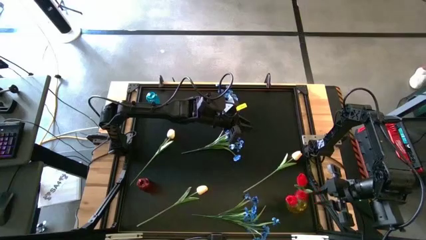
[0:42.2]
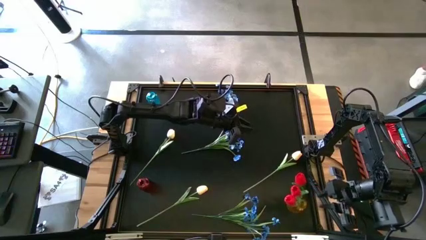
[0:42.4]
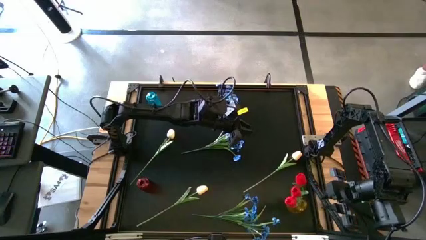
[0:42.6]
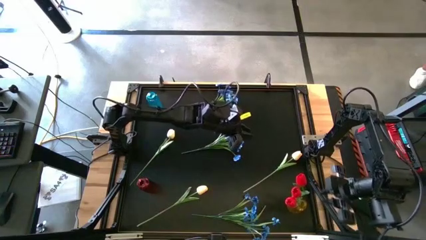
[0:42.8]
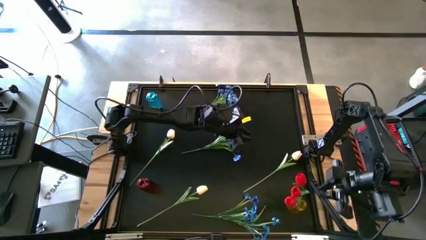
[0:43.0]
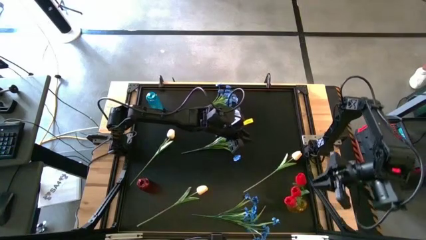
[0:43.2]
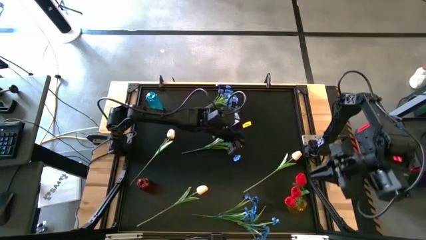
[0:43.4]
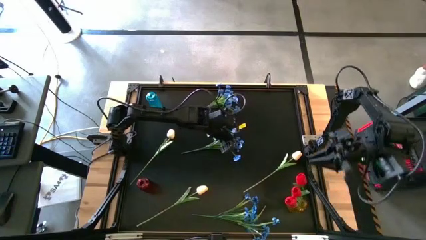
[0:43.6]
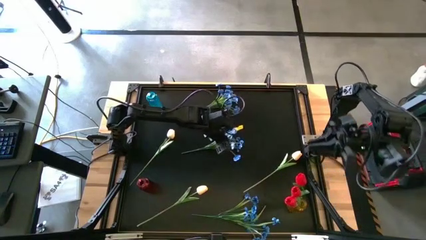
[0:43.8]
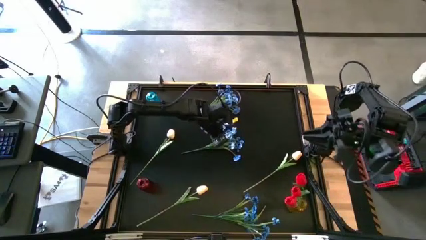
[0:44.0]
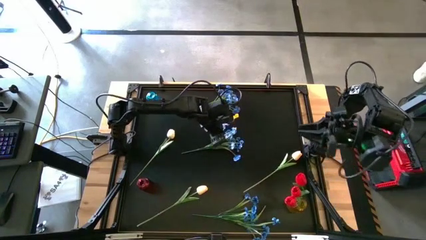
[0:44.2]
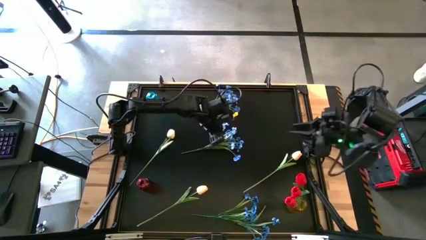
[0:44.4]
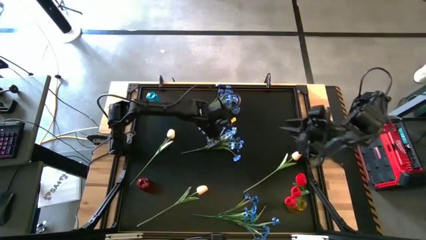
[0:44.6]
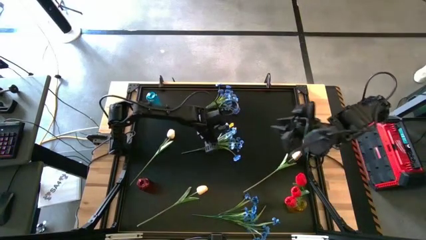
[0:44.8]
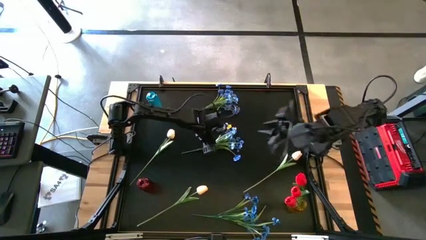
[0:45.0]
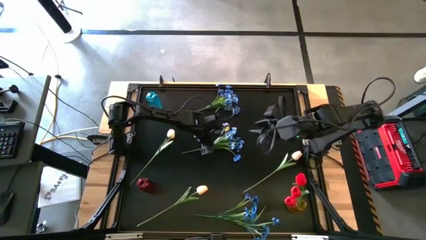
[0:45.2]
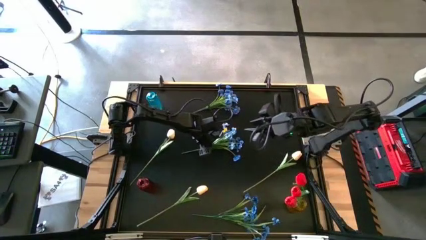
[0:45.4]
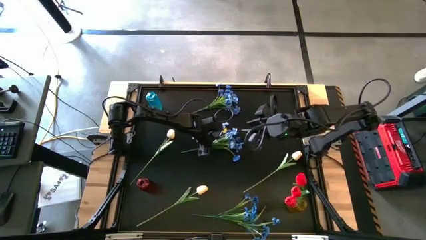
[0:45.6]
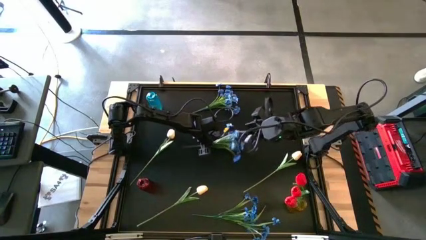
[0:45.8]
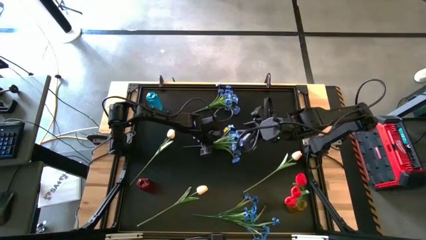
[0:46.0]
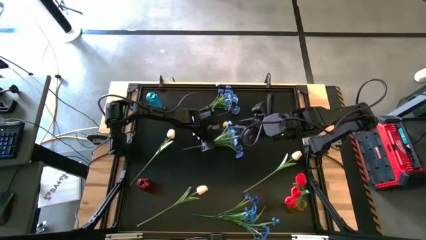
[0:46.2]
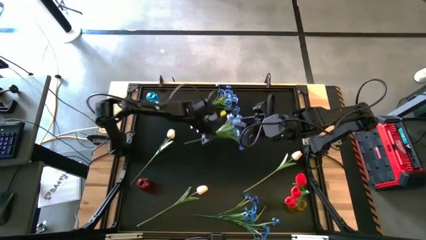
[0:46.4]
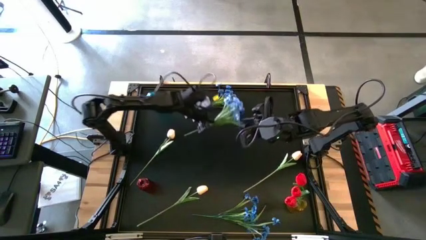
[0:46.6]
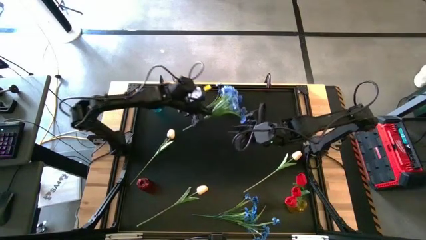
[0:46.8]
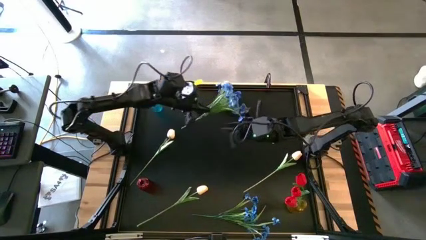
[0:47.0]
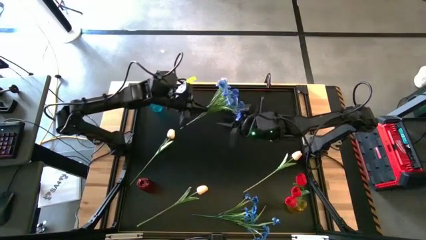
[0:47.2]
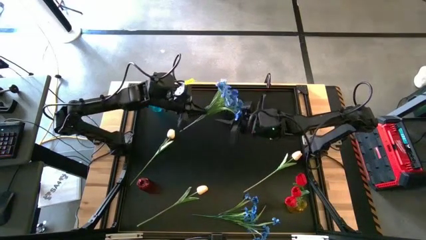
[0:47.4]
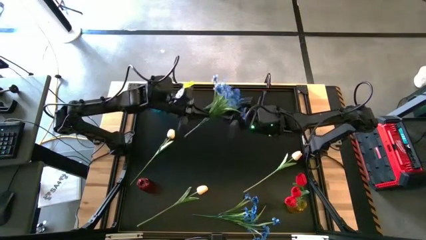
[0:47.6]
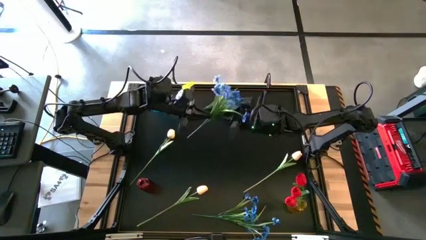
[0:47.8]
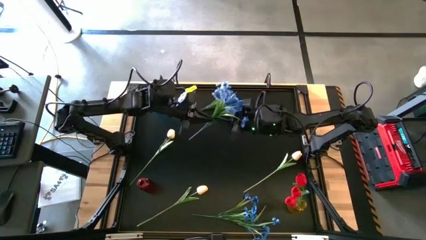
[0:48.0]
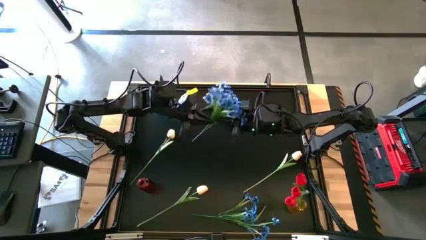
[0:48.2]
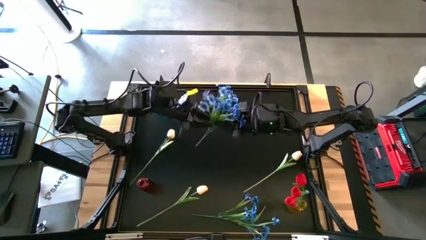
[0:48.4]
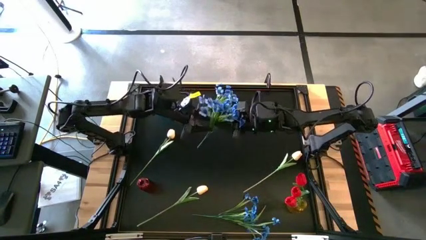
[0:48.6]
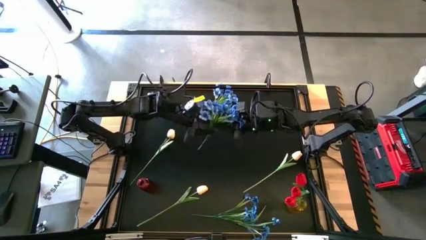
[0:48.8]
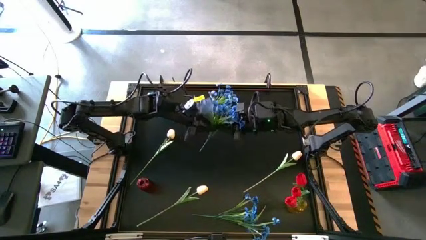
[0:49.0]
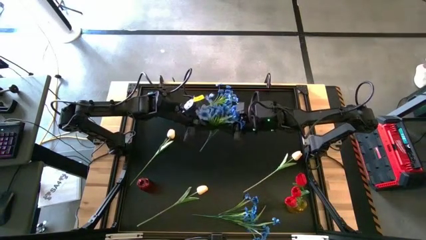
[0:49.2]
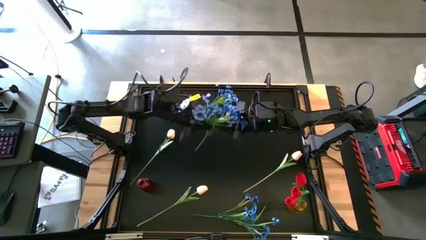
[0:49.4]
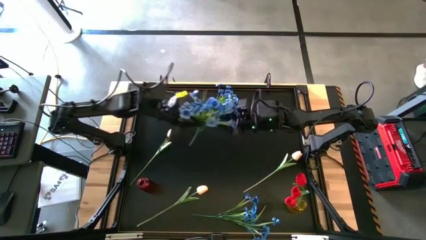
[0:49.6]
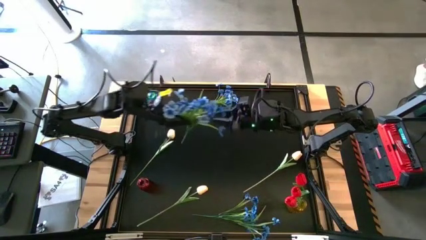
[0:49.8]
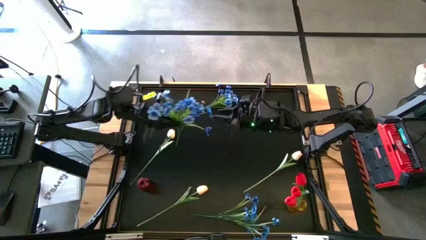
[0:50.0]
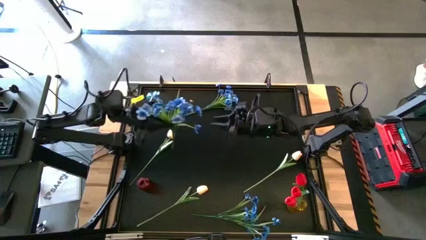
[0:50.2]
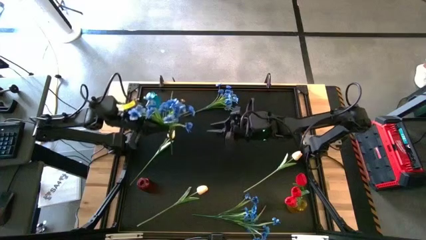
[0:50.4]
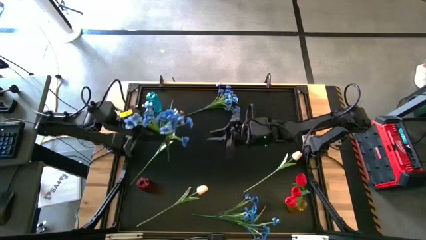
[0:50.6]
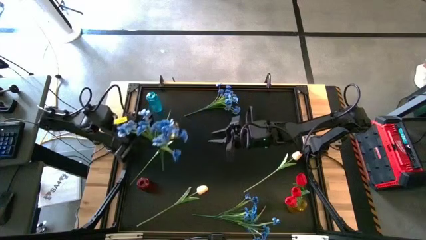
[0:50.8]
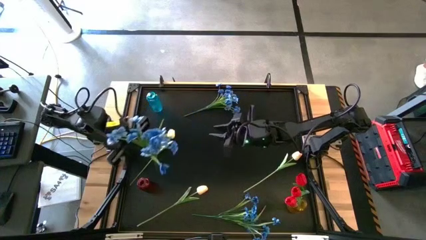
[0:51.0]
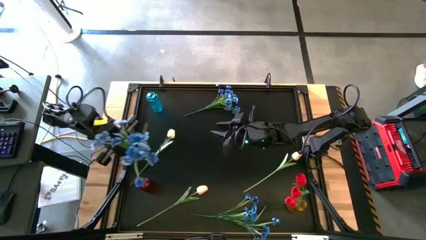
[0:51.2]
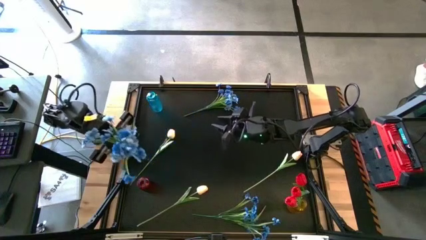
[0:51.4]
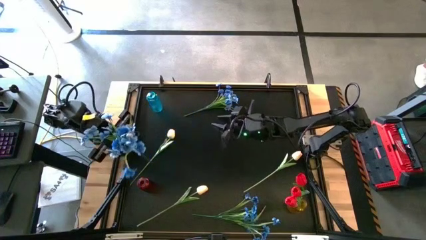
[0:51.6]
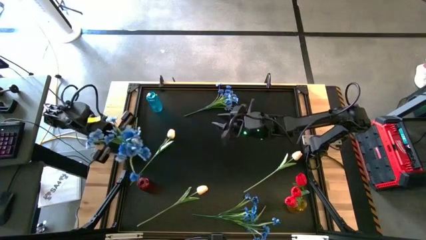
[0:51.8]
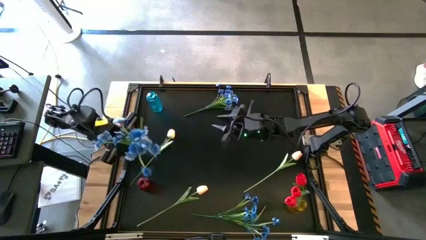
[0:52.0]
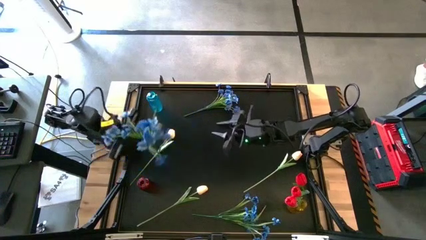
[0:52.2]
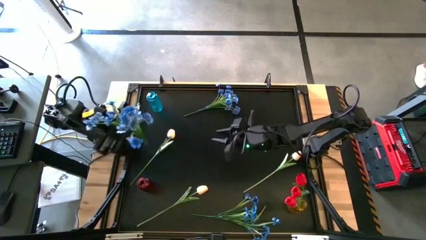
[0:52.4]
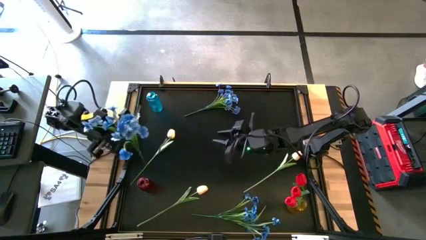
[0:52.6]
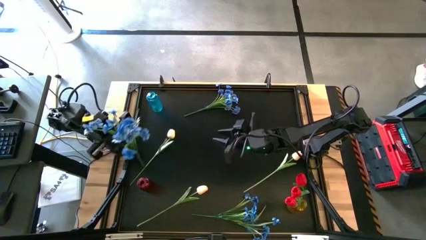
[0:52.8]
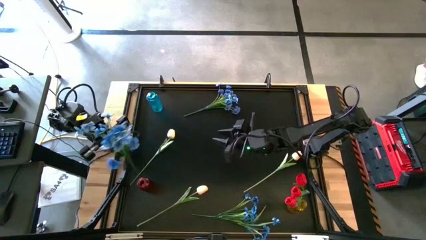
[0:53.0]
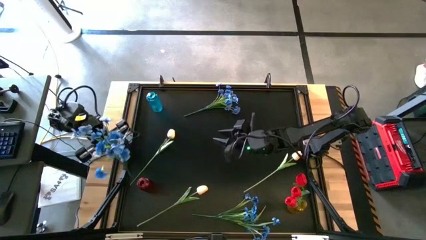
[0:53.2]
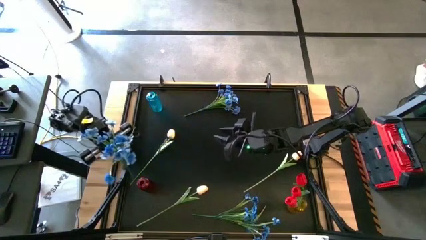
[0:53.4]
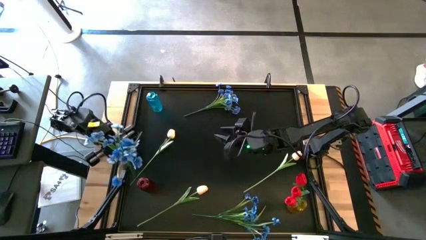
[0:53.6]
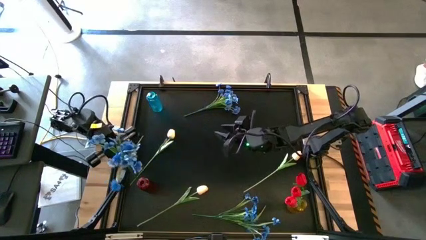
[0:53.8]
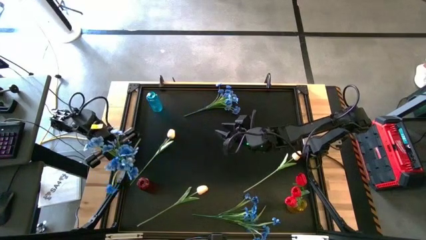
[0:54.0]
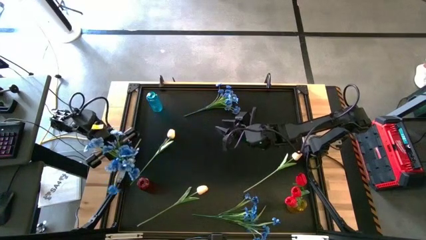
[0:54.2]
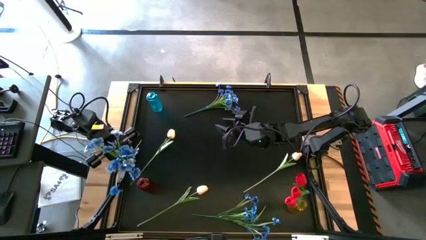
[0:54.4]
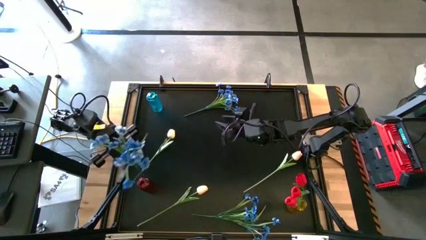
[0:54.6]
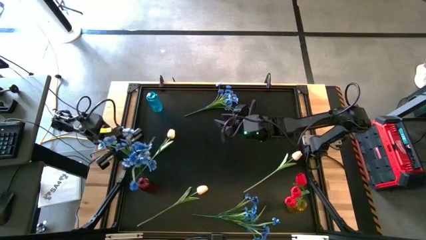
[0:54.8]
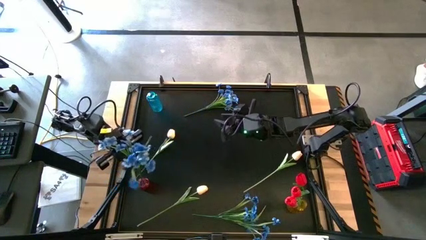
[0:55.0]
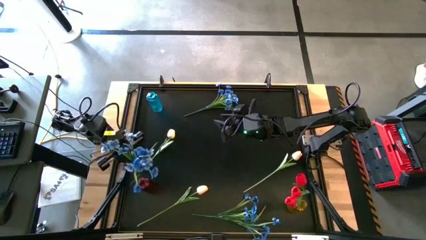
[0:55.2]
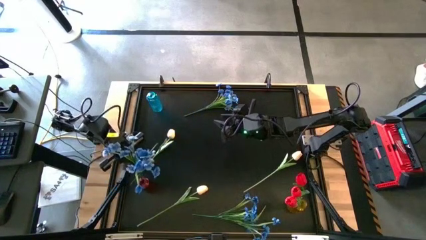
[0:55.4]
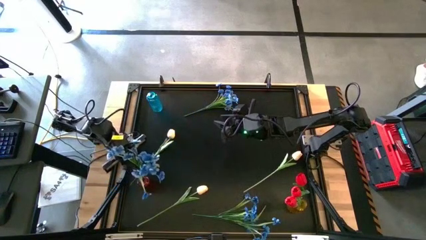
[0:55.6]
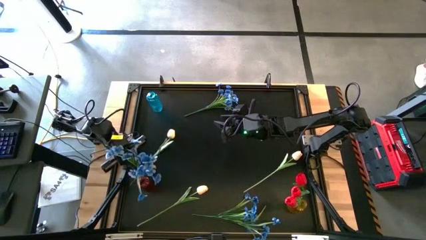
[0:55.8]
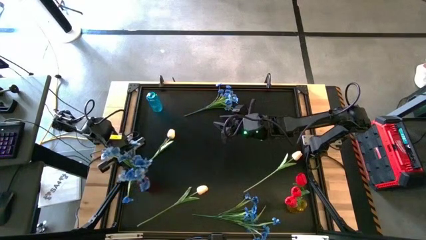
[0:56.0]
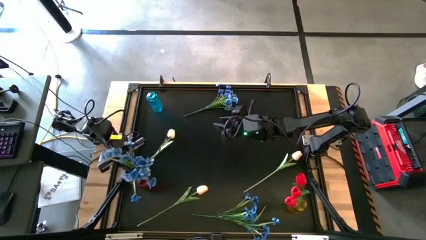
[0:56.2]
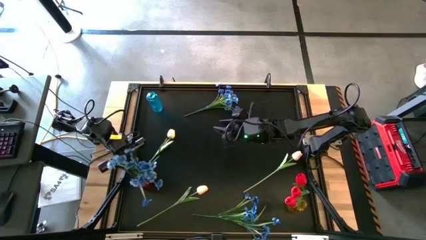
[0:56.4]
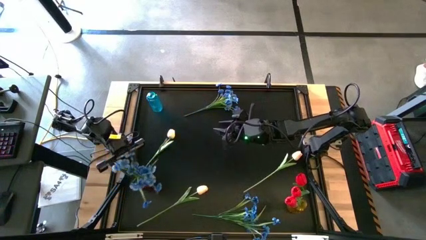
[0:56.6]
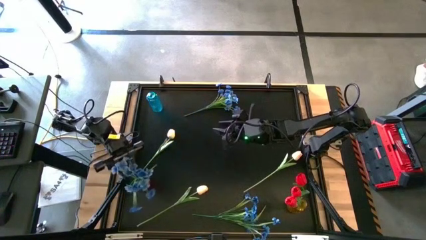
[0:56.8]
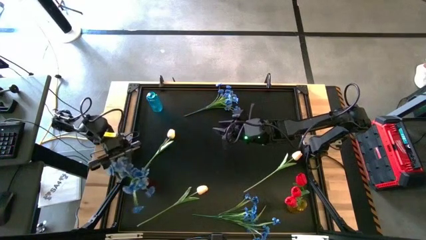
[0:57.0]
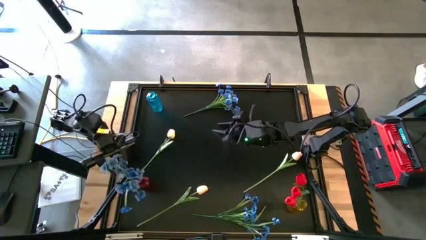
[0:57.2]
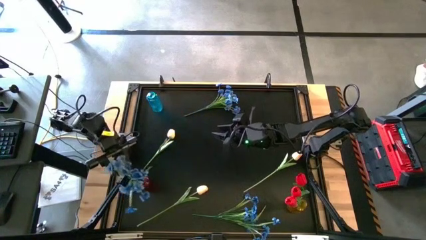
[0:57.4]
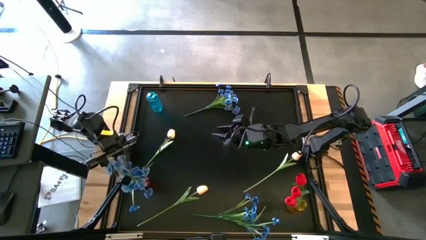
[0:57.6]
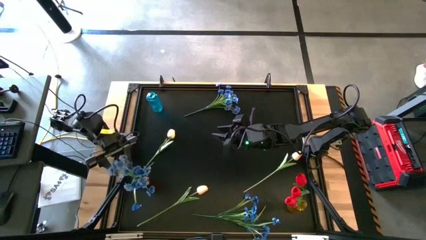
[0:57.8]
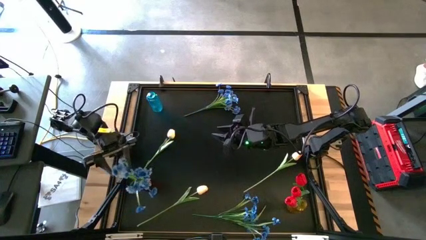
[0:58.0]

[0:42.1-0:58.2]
Task: Sort flowers into vase by color
Put the middle blue flowers into the red vase
